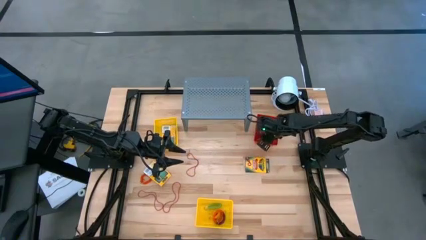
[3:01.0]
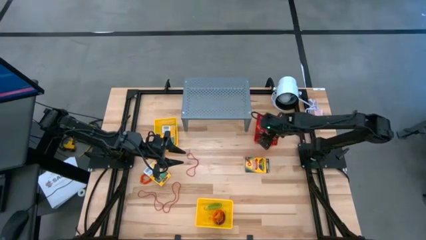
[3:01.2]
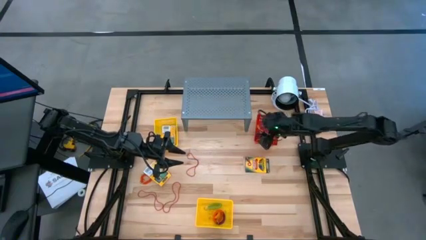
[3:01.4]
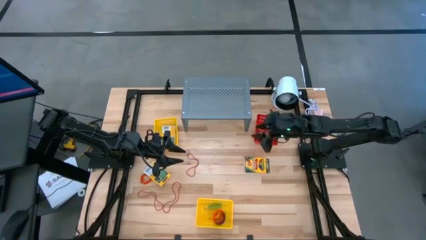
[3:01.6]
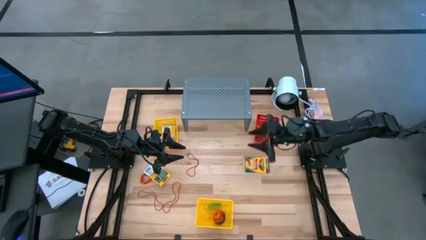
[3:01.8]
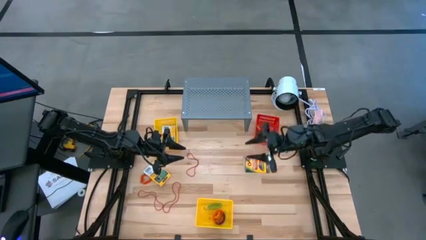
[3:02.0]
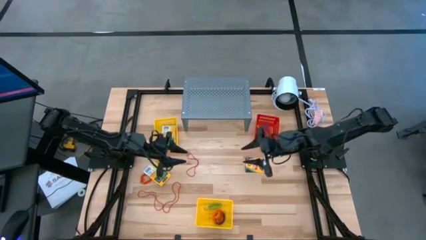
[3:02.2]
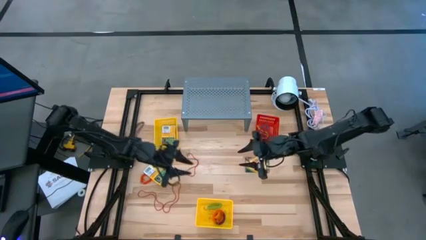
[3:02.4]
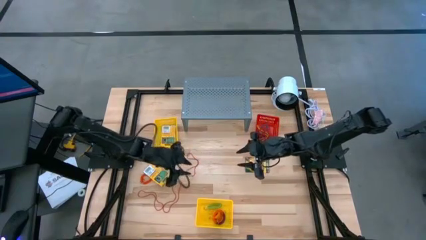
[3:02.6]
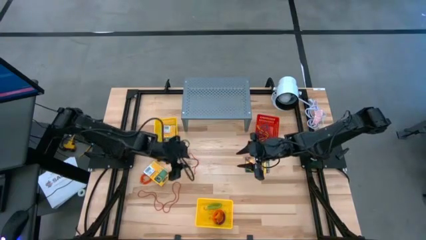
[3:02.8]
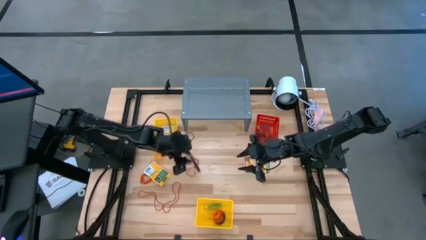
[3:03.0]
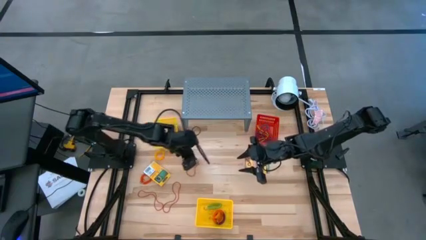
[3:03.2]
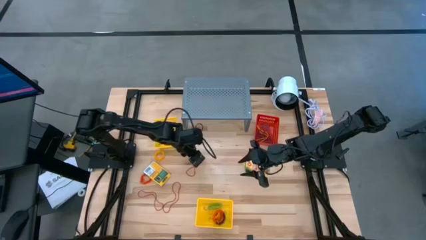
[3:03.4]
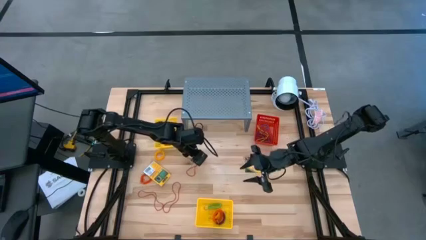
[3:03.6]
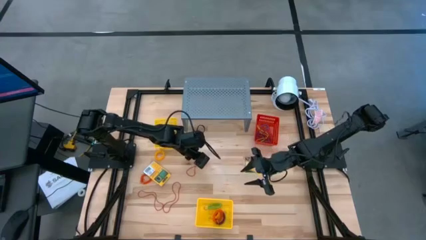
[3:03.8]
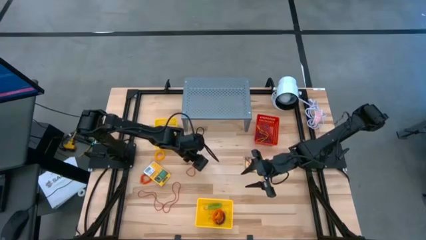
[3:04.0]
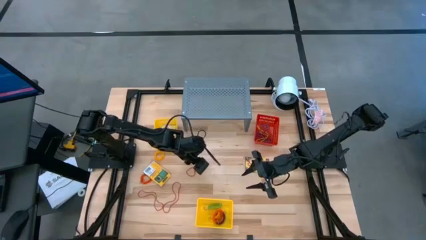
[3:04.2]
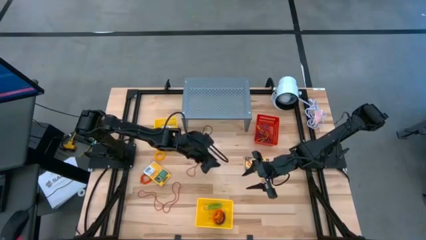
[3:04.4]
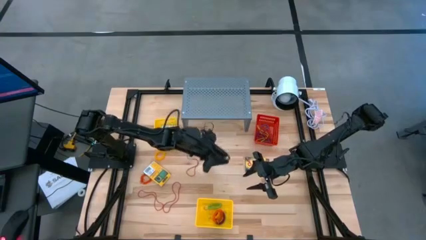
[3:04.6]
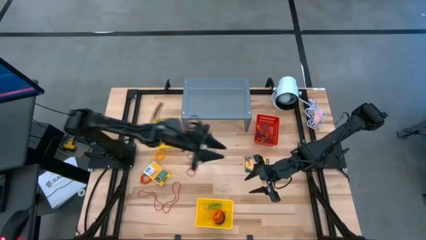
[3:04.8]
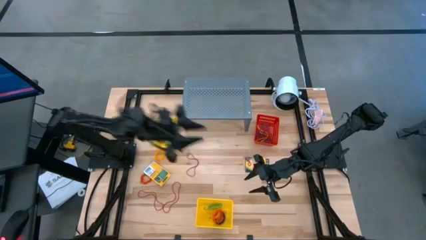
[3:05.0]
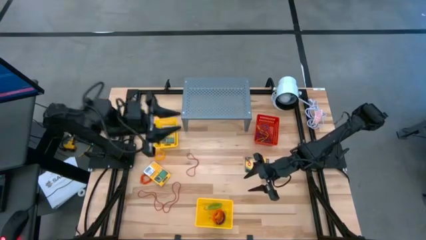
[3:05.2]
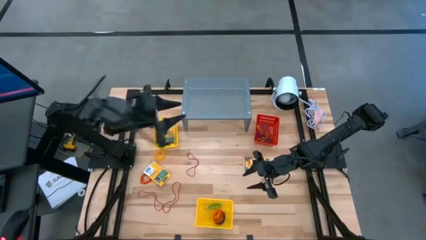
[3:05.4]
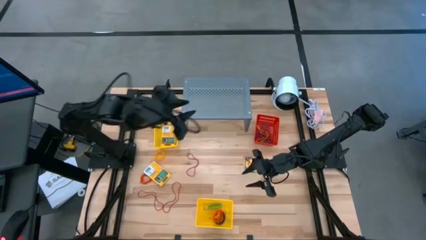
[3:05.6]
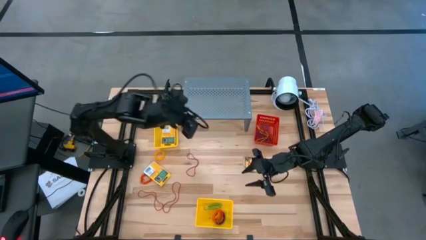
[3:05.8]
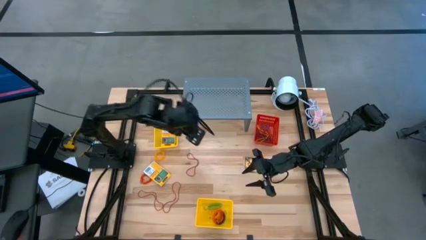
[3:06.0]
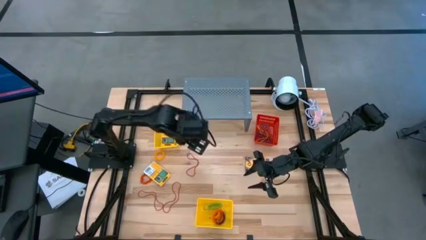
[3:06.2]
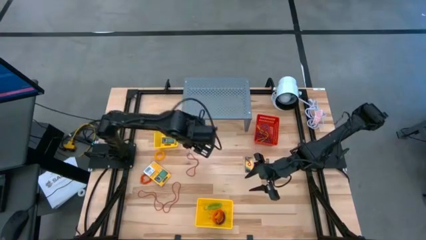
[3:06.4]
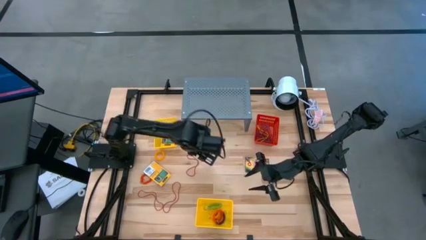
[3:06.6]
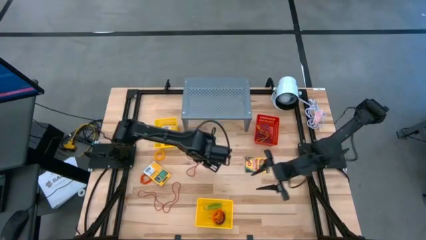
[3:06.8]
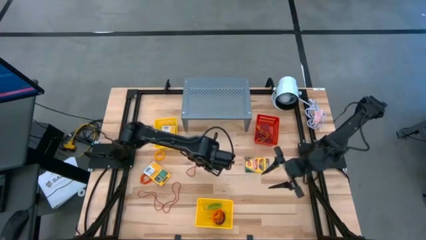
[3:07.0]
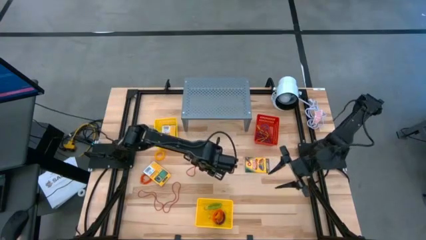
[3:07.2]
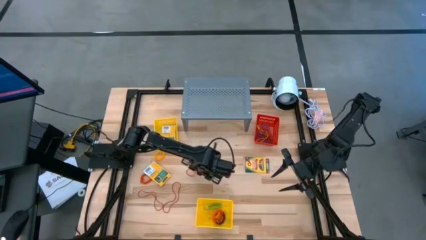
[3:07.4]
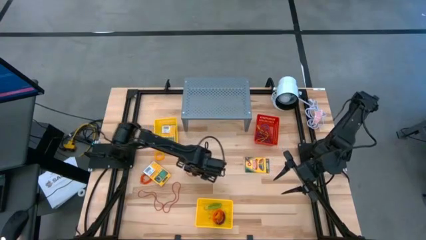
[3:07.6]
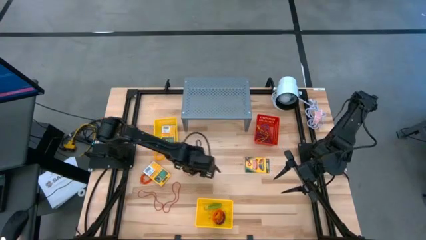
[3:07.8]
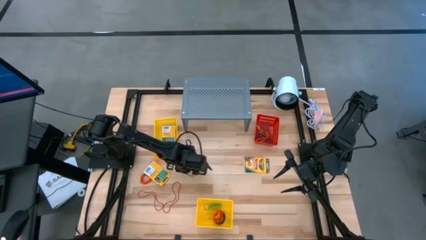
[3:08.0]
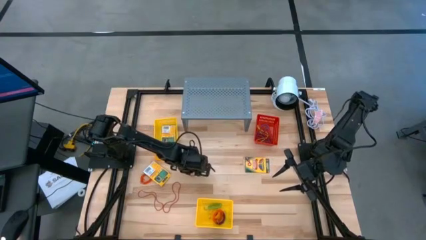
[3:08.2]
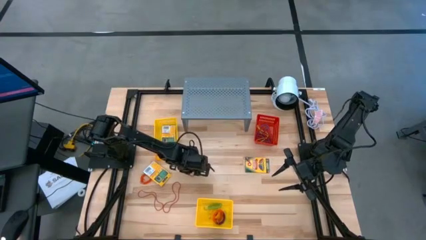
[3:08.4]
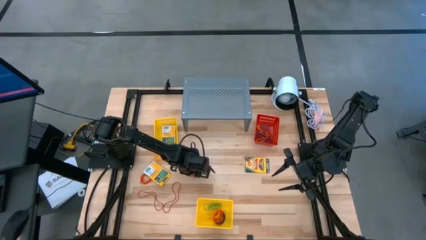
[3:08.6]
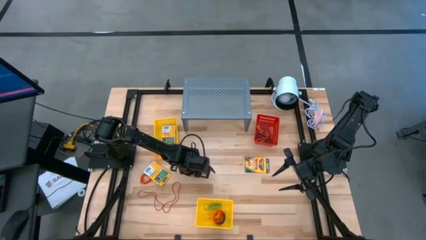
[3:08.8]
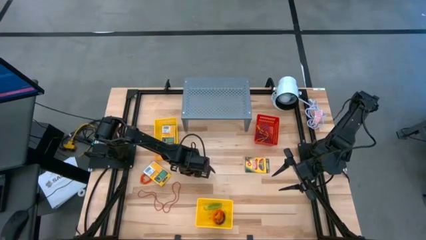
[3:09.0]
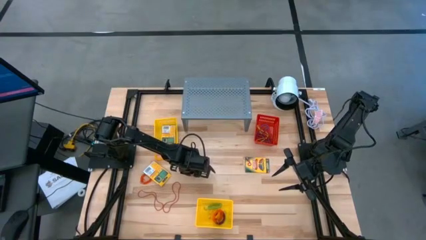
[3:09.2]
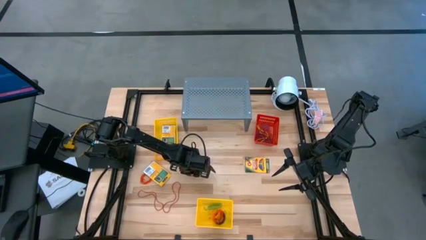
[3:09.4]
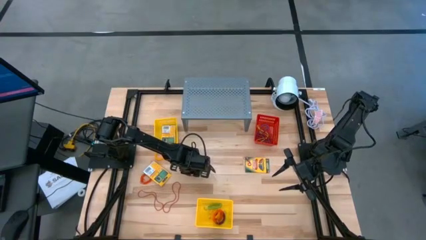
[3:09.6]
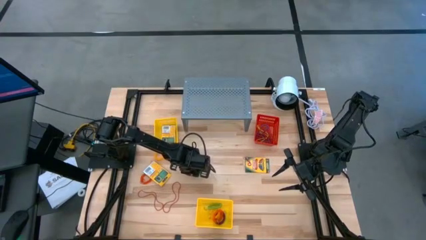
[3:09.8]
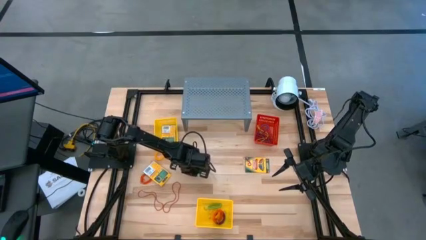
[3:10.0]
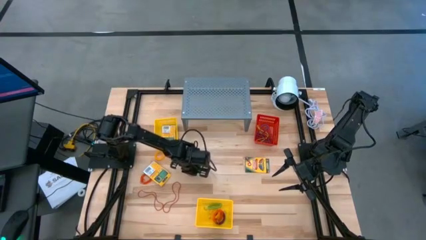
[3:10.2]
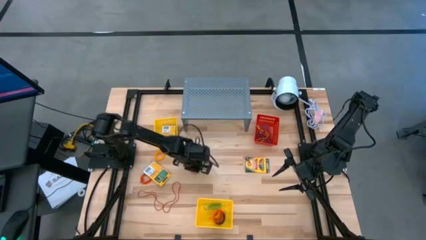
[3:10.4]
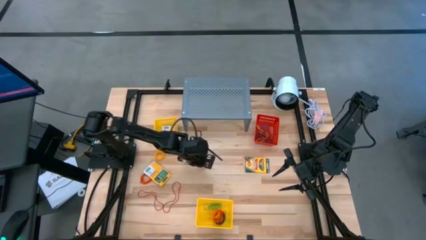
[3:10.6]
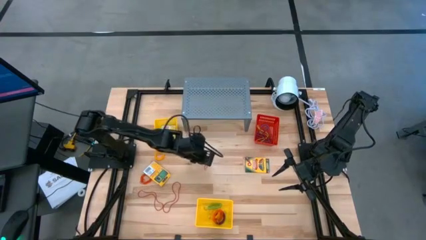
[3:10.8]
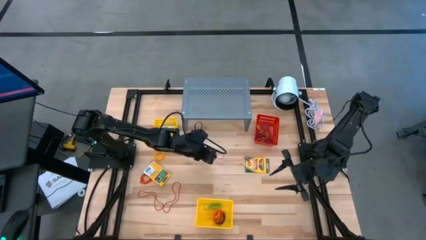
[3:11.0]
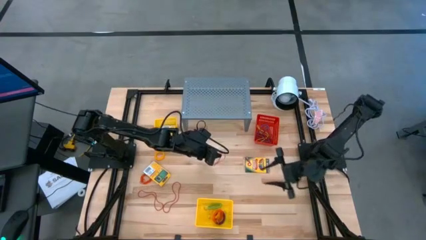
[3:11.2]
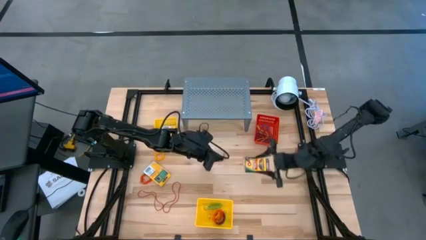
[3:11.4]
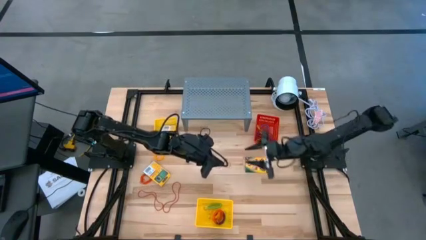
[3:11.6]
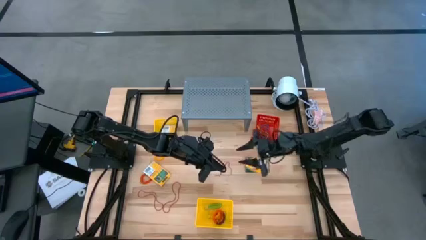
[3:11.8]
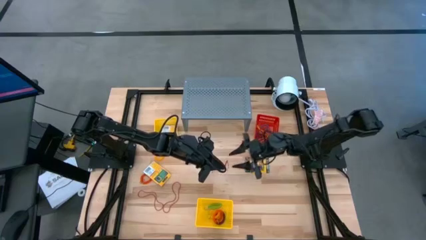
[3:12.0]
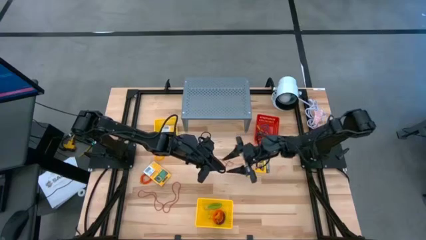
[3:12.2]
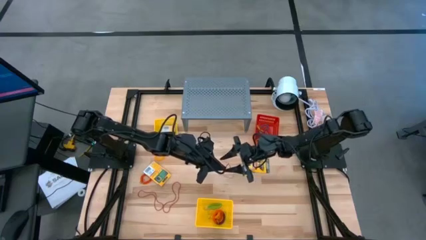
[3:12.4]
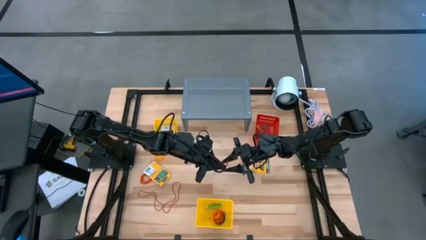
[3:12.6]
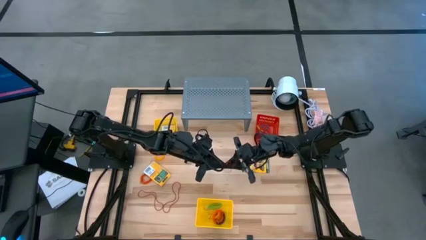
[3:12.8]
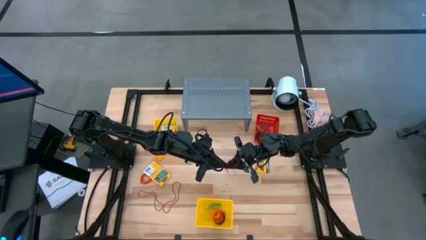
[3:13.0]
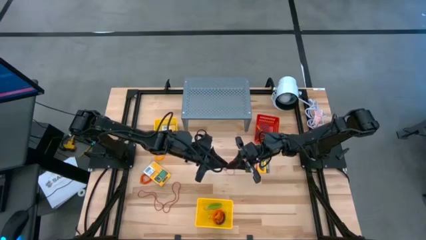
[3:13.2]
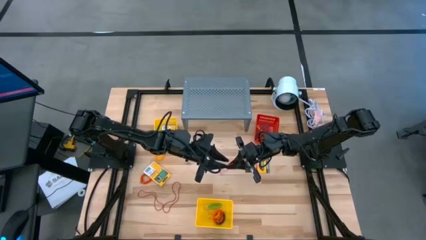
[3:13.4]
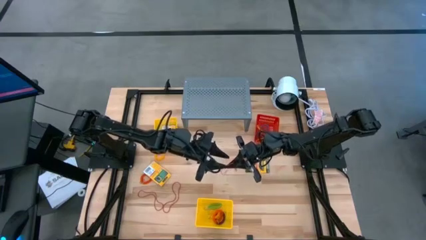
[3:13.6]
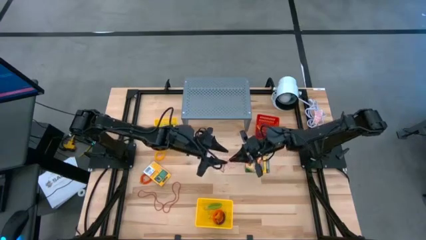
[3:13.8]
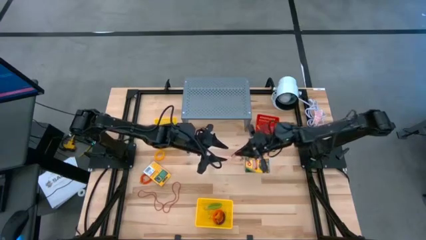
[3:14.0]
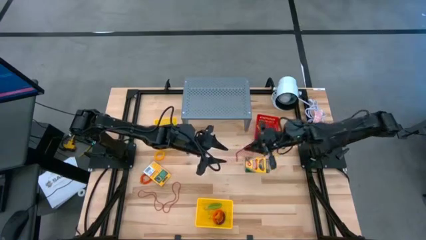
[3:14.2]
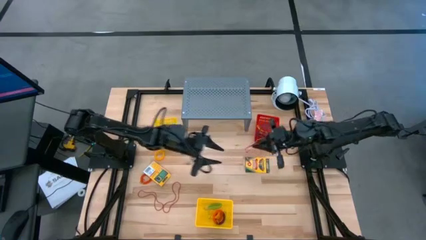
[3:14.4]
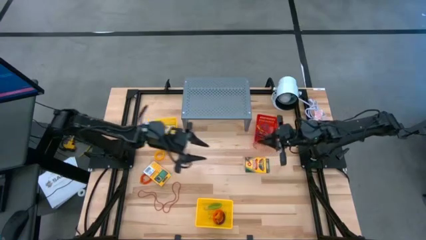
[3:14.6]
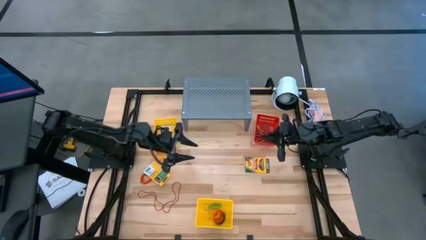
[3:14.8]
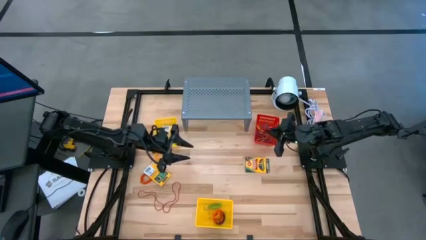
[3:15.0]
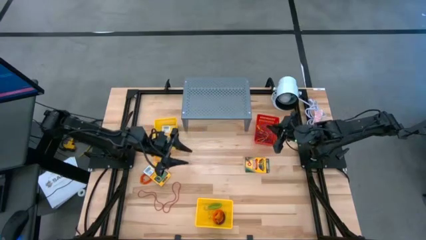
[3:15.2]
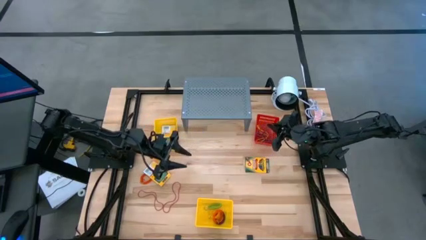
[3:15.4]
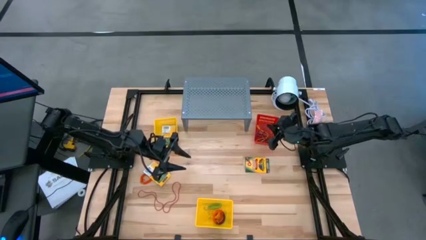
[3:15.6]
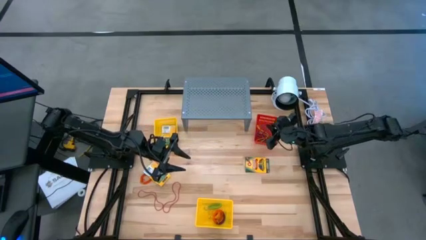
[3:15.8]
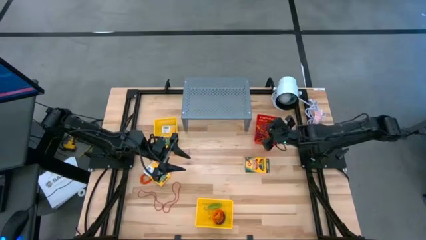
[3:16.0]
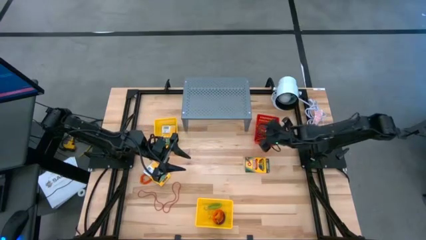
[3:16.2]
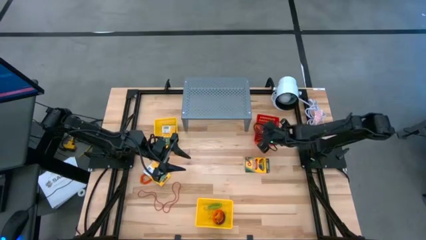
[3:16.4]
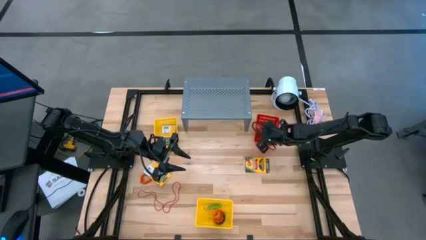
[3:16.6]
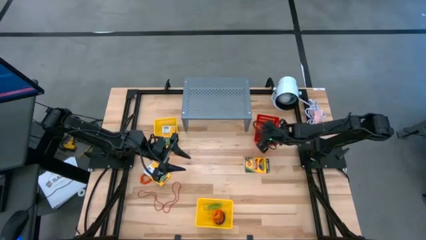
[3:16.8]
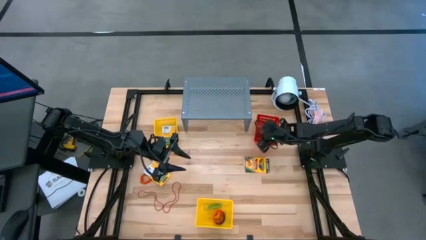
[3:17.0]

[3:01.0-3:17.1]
Task: Pick & Place Office Desk Supplies
Put the red rubber band into the red bin
